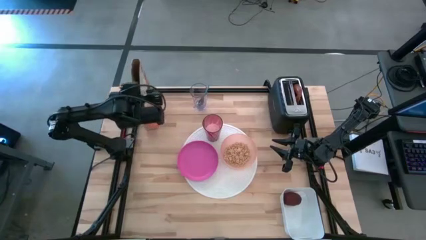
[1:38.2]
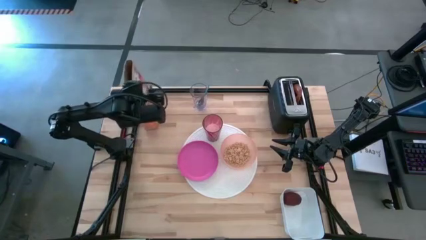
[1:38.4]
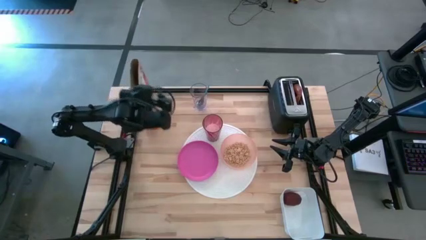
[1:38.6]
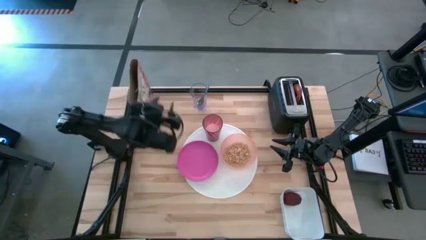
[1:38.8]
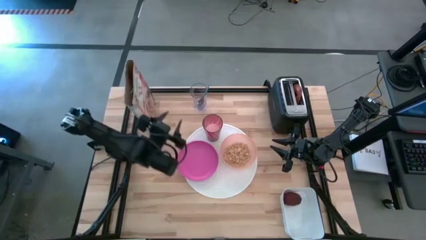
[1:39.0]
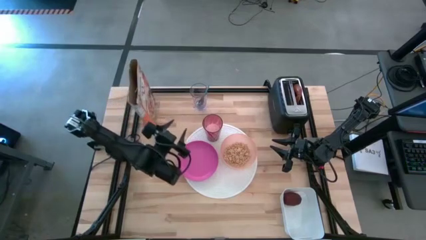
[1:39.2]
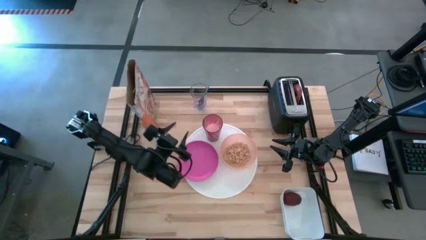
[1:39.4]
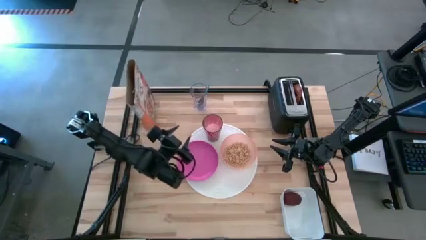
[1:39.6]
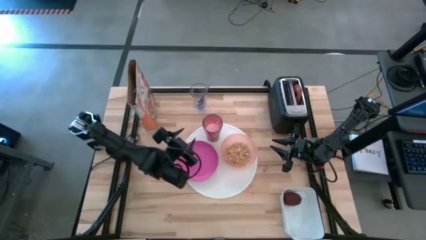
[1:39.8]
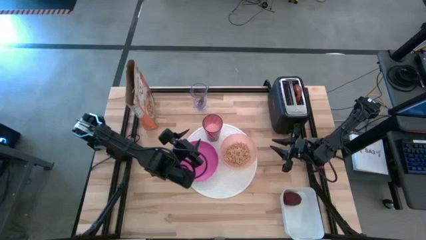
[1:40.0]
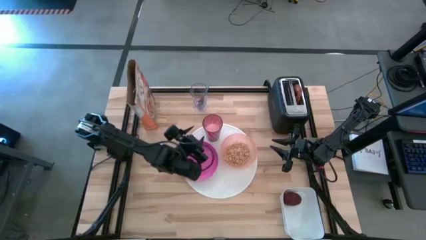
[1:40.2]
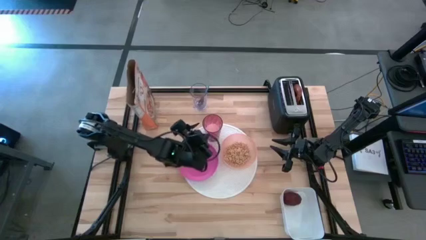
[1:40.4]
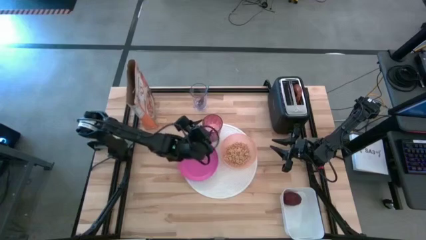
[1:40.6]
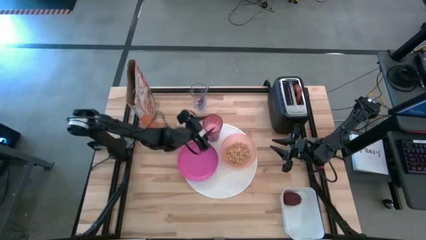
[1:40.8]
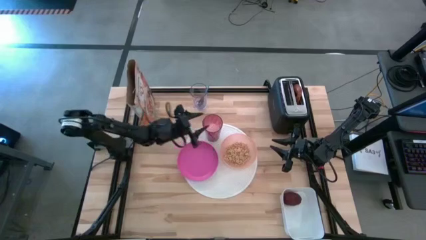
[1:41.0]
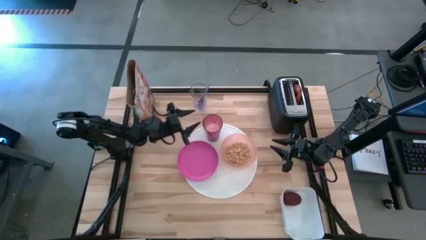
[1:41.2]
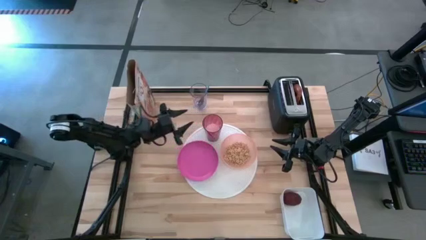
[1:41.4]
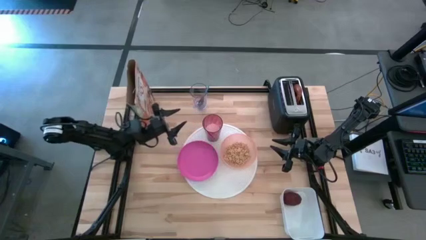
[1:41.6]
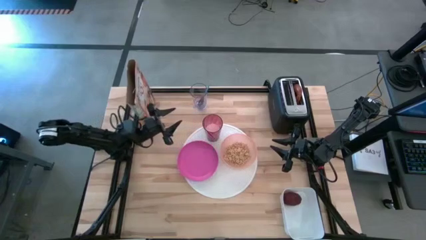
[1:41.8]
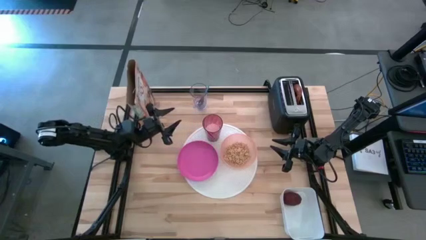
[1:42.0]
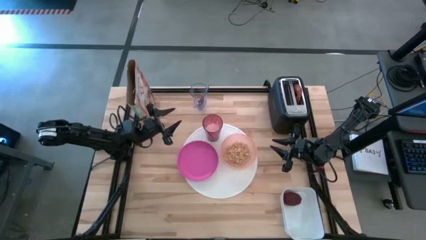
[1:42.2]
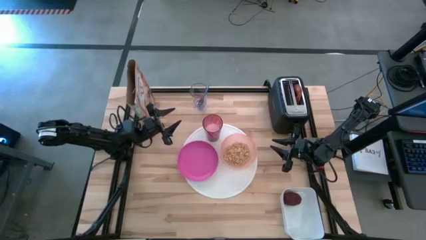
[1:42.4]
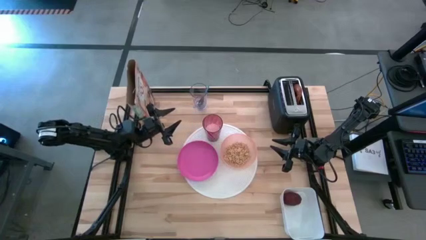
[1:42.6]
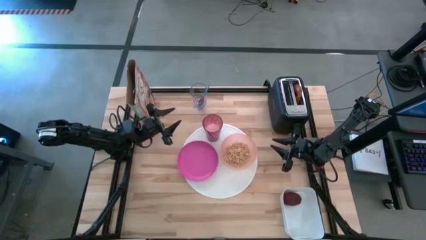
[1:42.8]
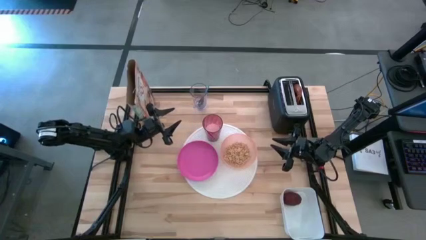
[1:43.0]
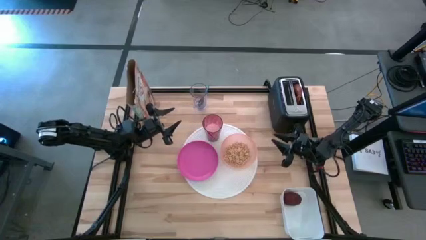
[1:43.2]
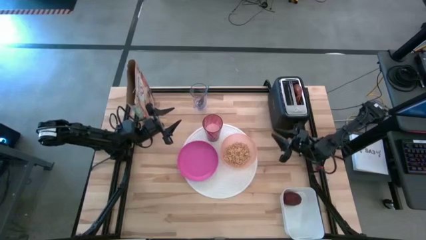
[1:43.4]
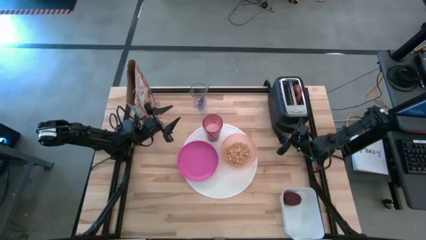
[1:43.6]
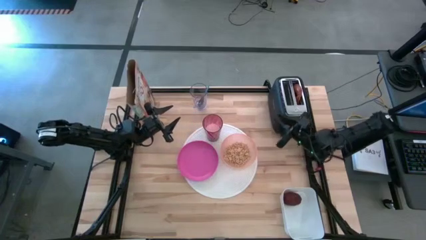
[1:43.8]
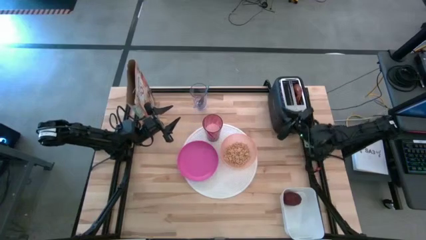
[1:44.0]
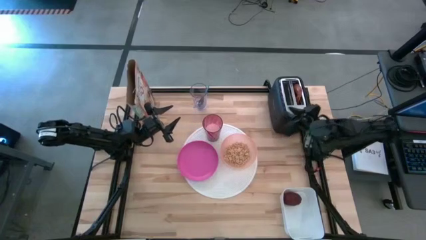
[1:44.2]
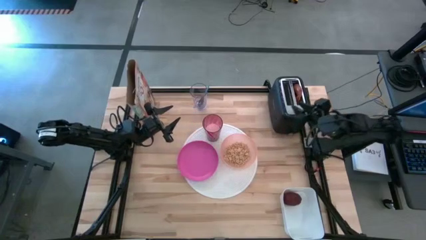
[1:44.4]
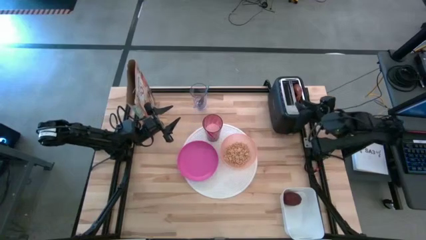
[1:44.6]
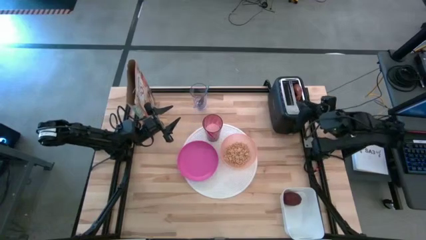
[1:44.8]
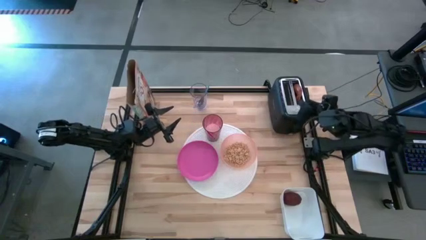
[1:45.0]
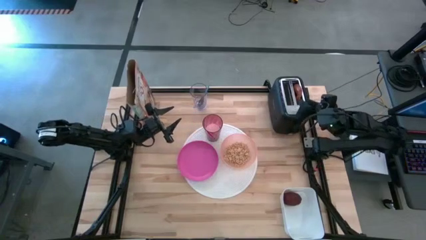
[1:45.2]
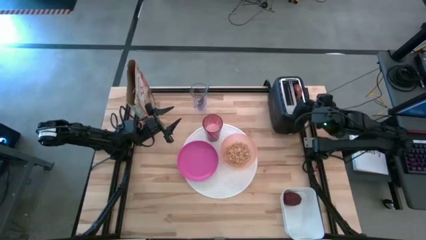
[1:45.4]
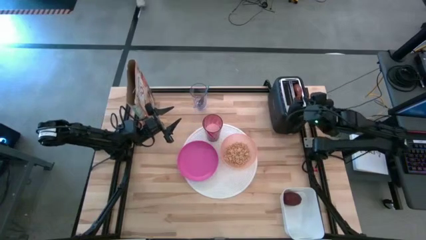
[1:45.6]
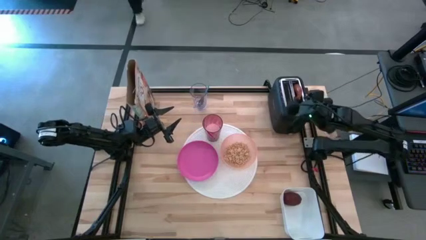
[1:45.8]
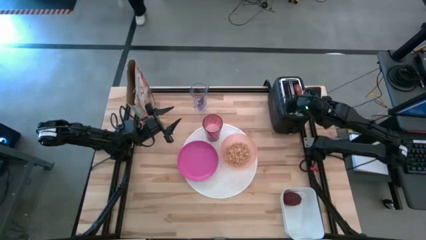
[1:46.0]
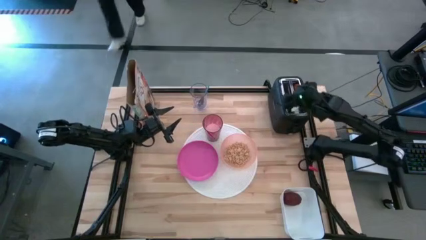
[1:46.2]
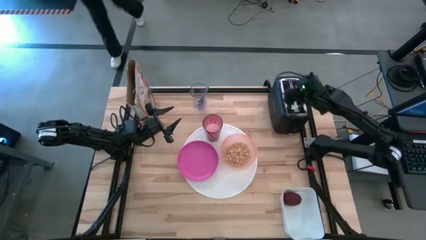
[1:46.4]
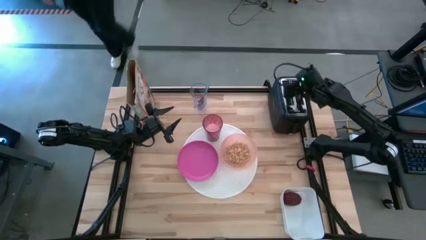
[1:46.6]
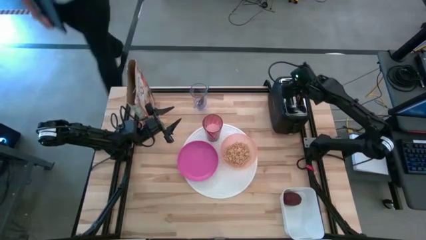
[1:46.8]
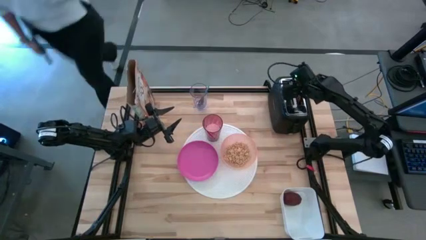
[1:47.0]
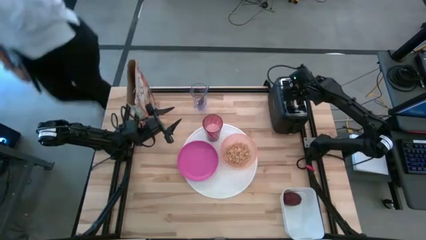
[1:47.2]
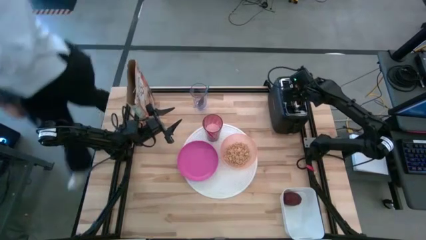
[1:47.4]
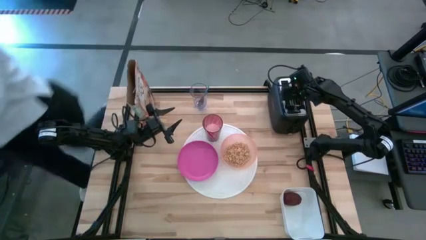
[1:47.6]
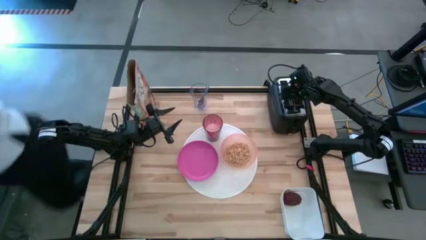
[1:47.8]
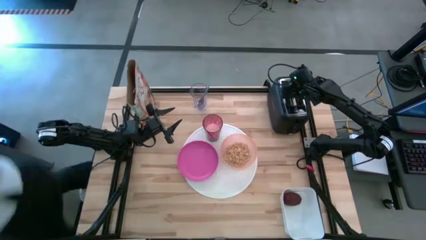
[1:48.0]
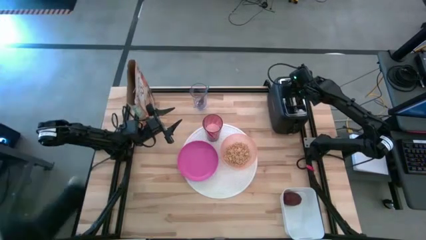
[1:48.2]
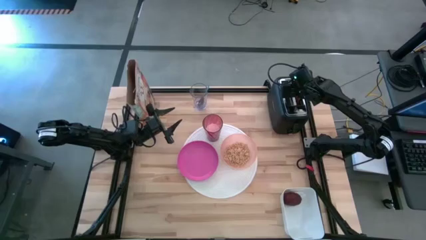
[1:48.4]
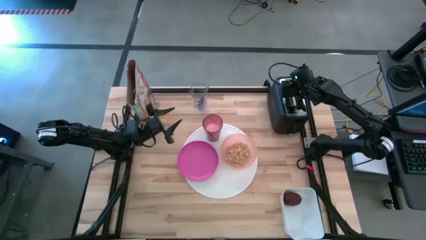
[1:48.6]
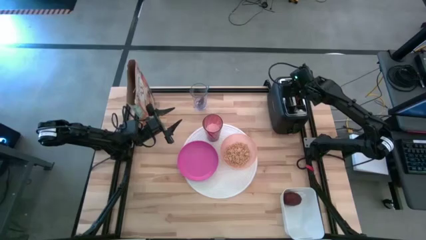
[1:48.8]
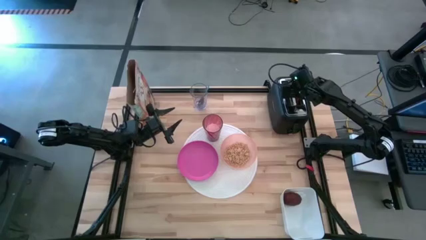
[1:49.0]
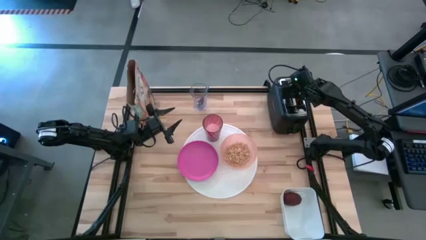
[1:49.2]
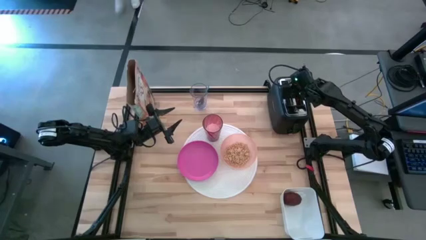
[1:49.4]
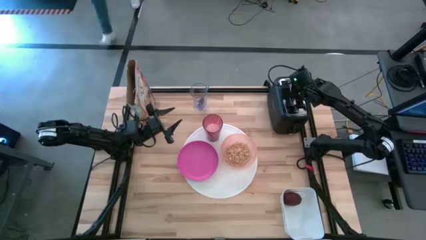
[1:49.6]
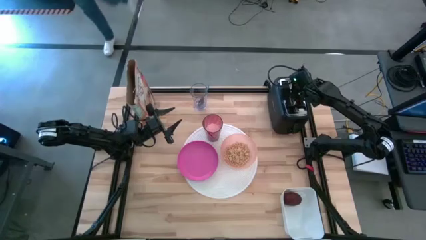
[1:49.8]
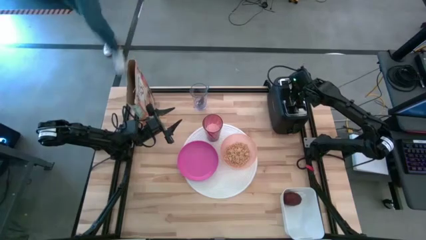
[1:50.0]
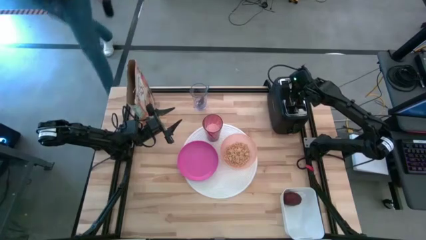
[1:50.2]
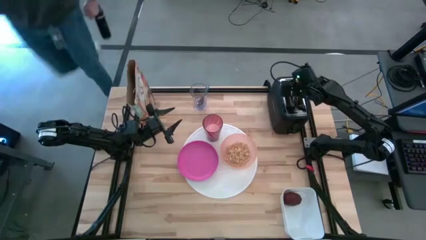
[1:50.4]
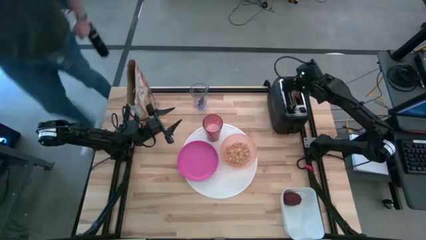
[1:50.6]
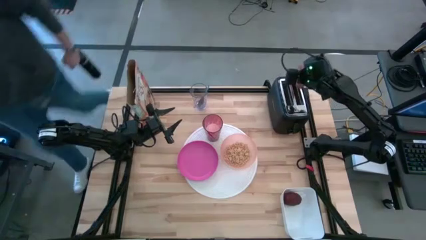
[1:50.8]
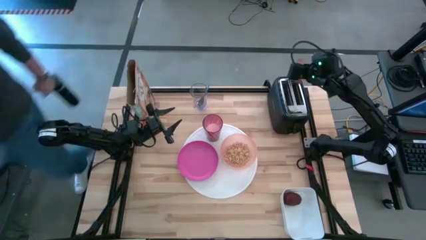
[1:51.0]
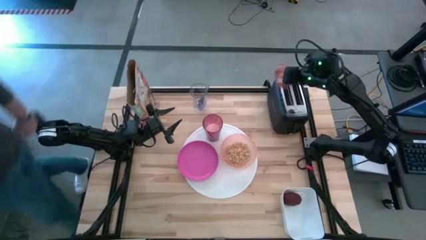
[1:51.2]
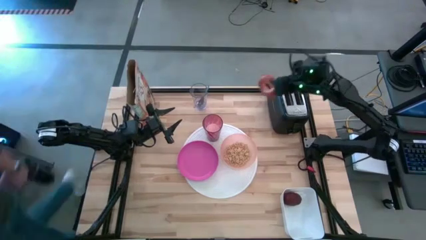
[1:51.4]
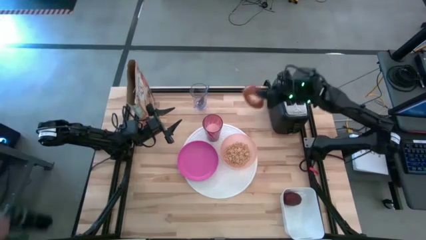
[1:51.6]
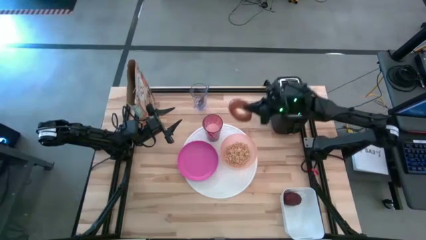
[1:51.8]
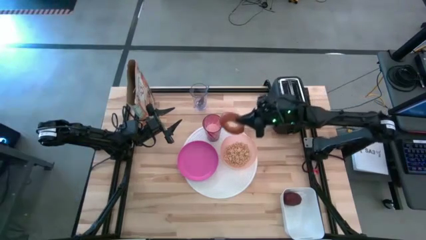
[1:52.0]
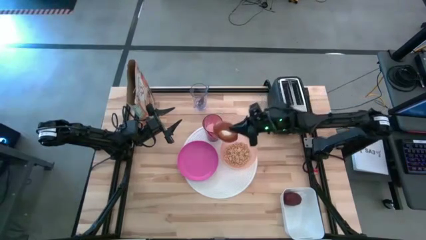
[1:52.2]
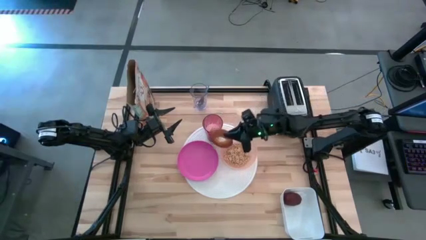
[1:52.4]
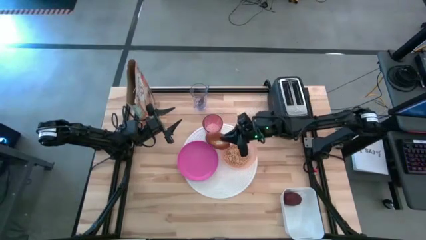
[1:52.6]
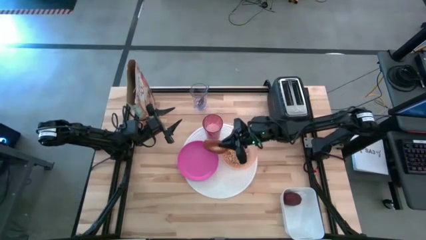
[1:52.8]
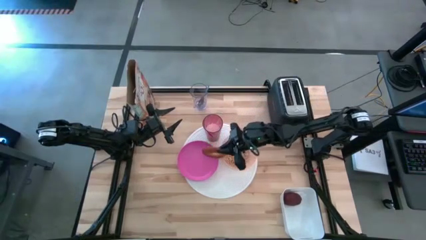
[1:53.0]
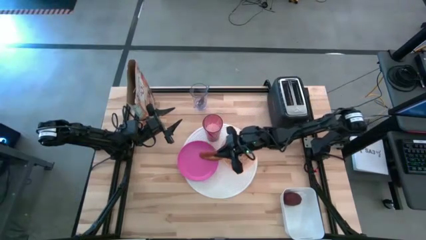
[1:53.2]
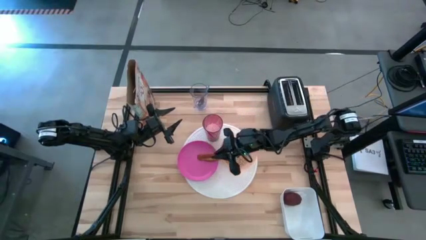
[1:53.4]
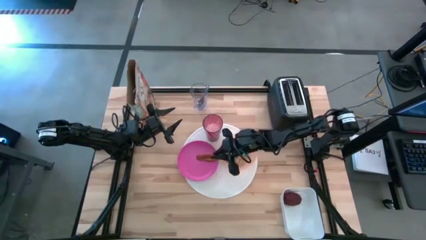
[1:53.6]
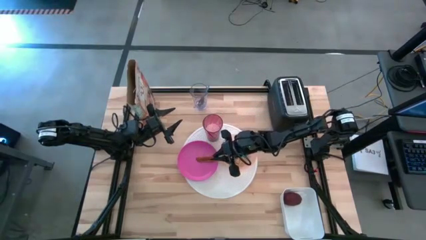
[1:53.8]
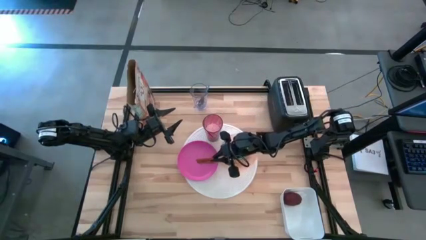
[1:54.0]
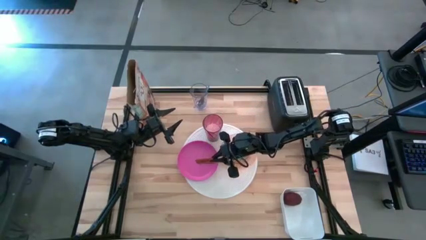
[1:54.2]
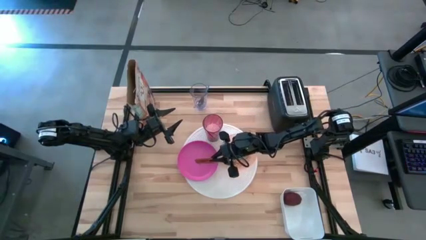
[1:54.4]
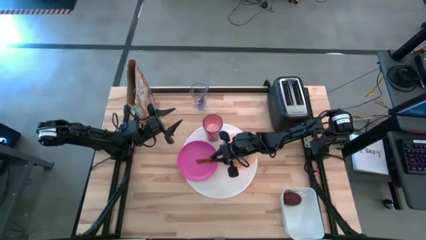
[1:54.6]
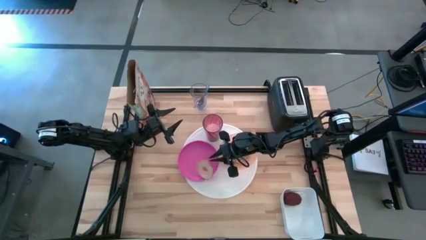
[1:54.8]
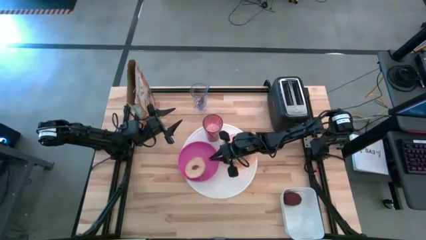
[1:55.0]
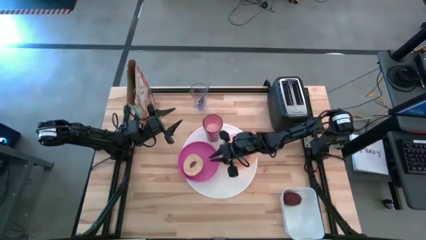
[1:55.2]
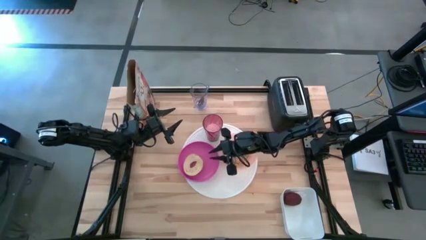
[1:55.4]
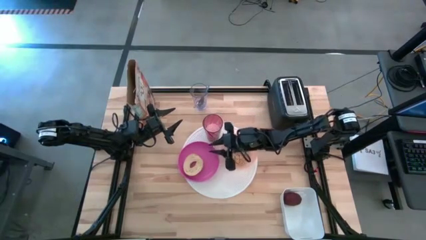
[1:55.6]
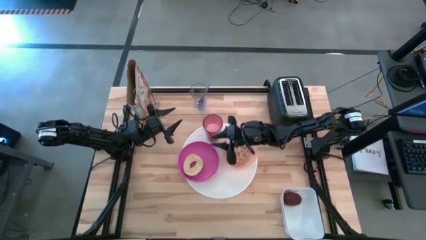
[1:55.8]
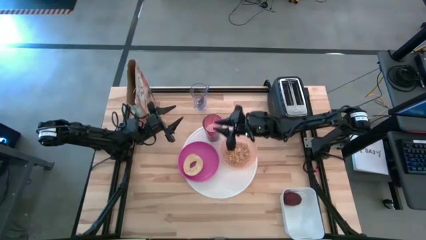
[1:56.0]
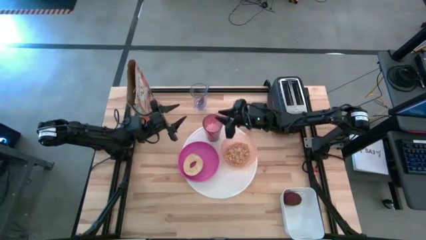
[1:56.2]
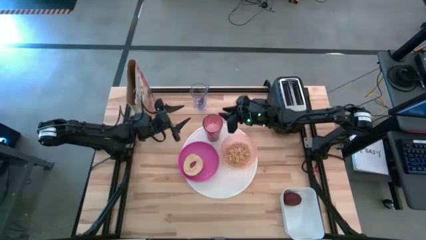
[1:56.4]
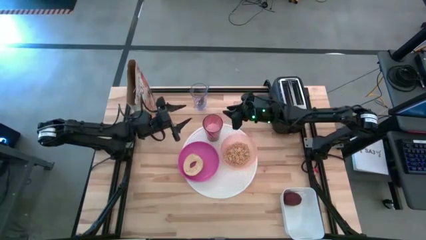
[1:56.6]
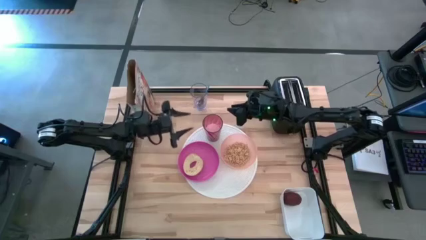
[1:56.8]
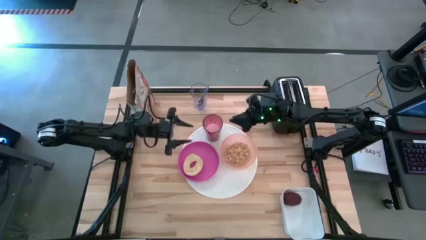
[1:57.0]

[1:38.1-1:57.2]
Task: Arrange a breakfast setting
Put the bagel from the toaster onto the pink plate on the placemat
